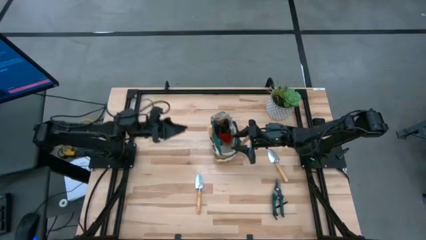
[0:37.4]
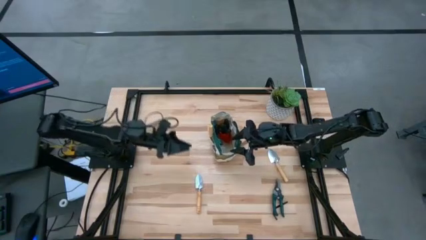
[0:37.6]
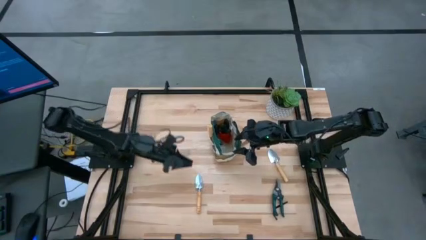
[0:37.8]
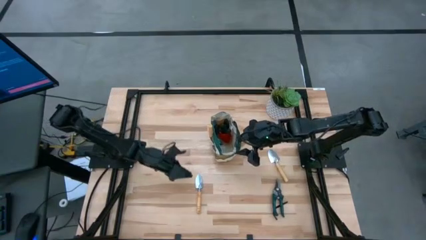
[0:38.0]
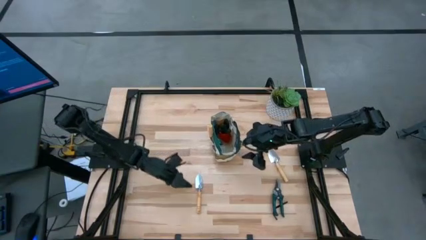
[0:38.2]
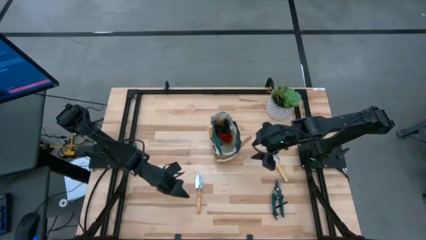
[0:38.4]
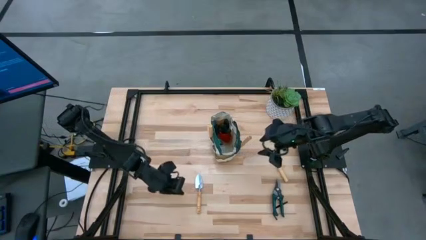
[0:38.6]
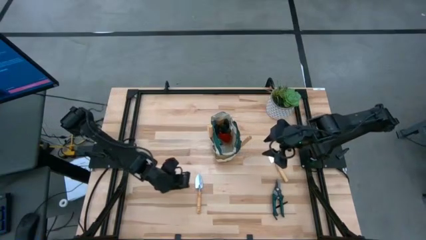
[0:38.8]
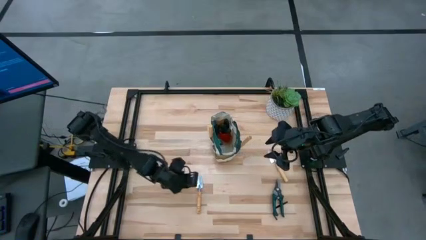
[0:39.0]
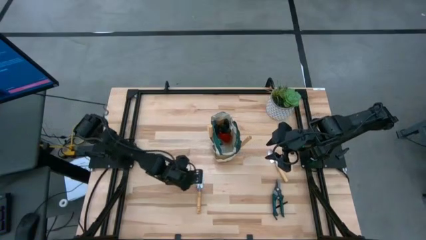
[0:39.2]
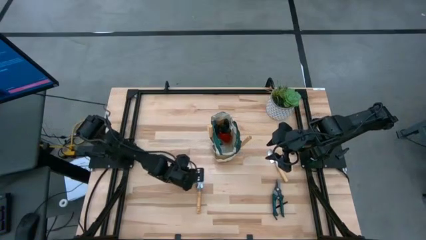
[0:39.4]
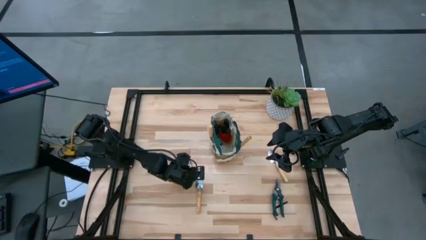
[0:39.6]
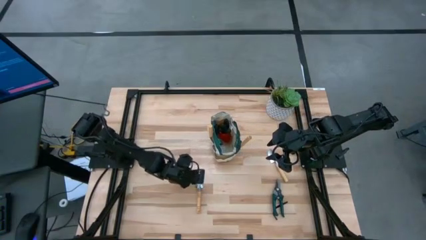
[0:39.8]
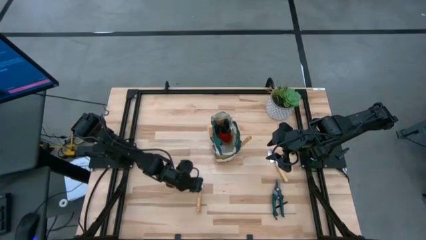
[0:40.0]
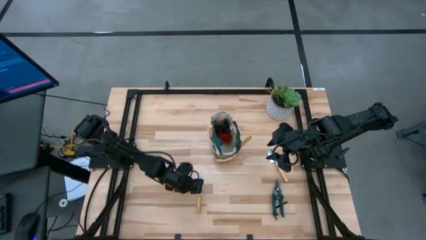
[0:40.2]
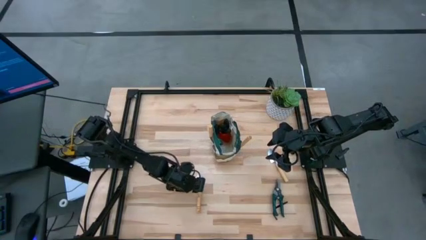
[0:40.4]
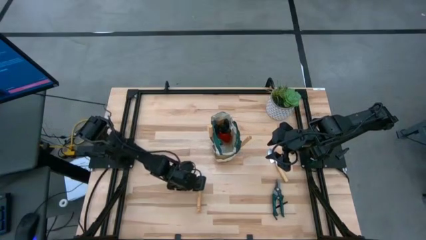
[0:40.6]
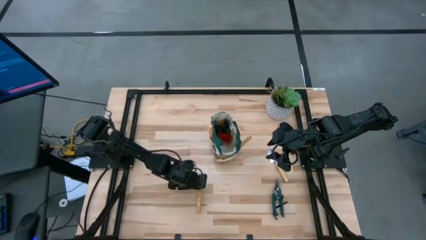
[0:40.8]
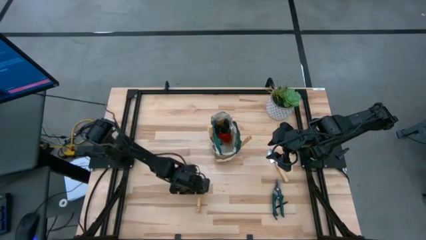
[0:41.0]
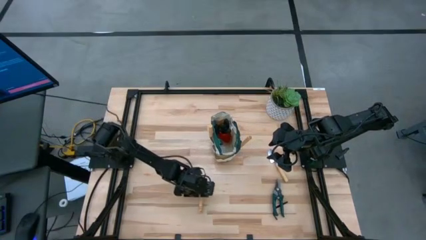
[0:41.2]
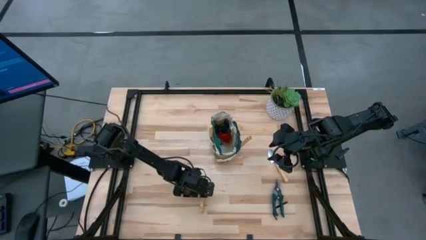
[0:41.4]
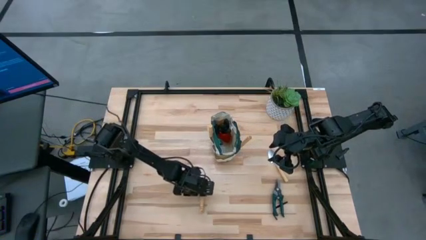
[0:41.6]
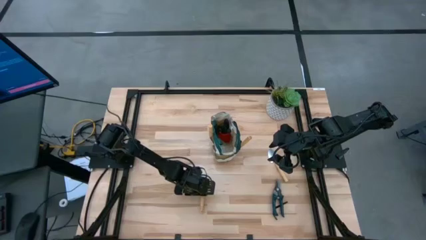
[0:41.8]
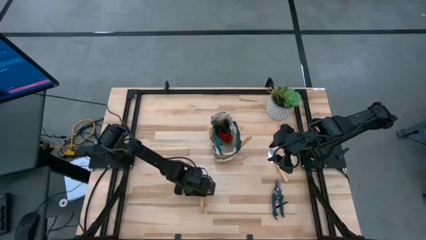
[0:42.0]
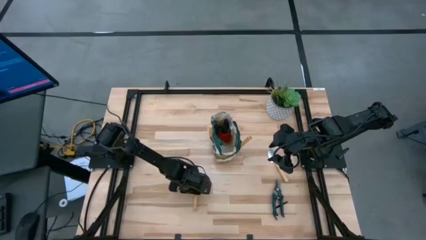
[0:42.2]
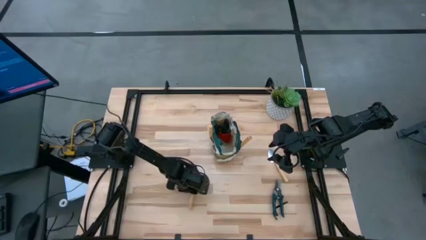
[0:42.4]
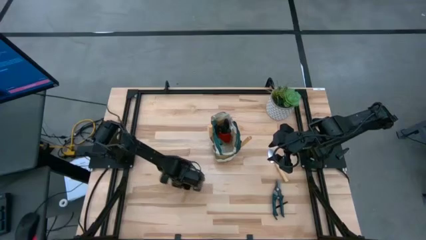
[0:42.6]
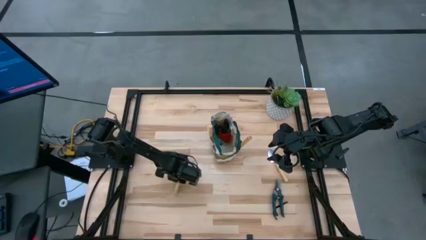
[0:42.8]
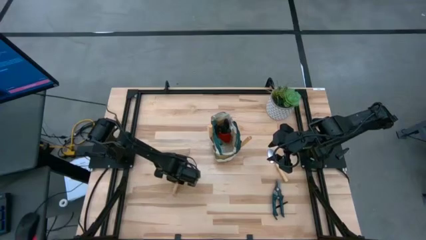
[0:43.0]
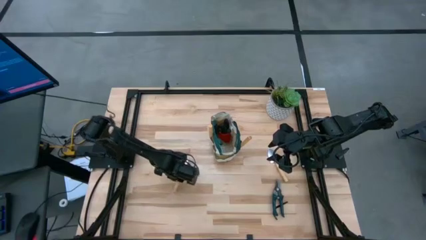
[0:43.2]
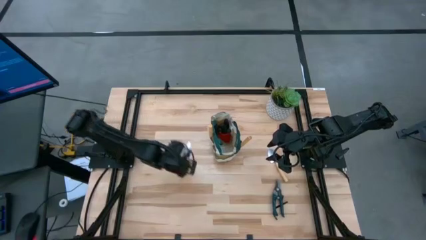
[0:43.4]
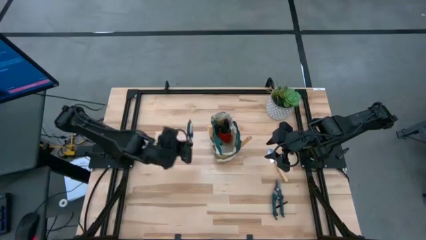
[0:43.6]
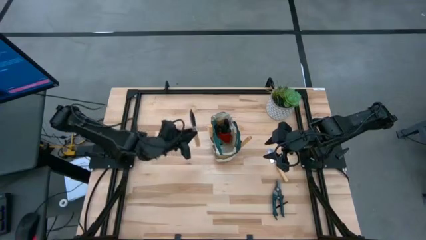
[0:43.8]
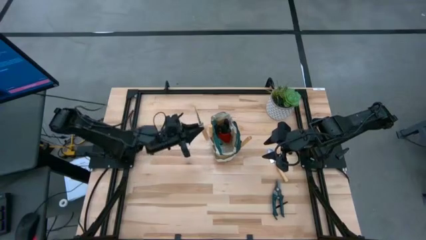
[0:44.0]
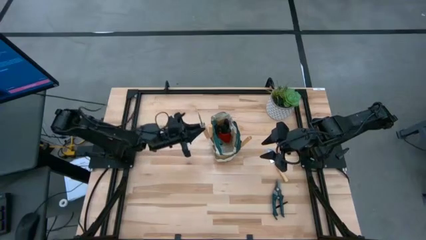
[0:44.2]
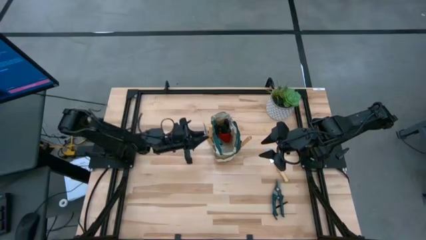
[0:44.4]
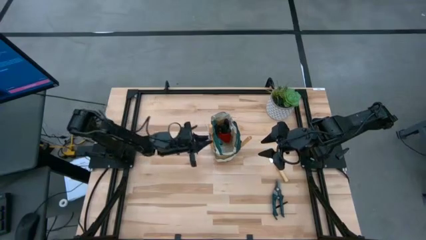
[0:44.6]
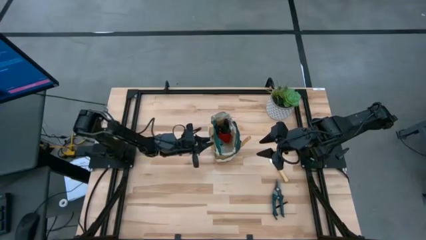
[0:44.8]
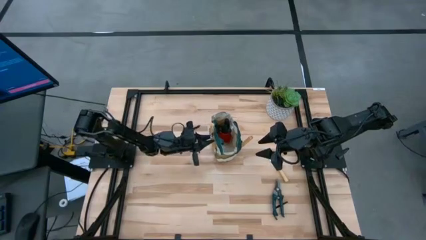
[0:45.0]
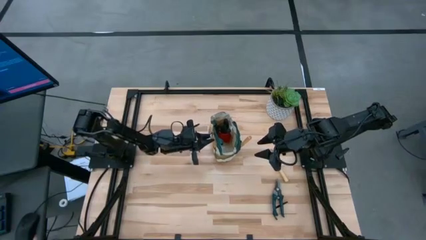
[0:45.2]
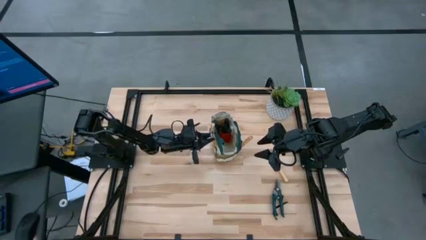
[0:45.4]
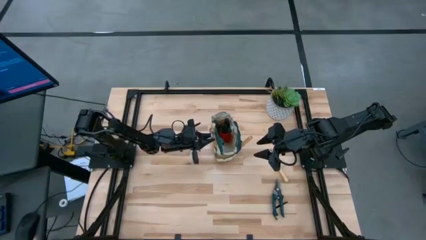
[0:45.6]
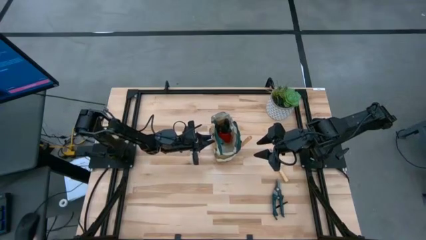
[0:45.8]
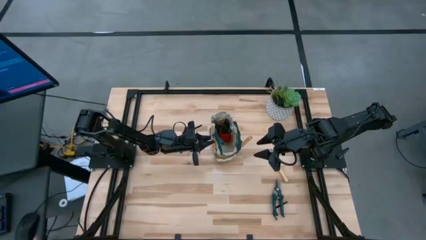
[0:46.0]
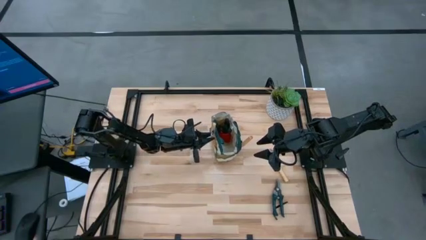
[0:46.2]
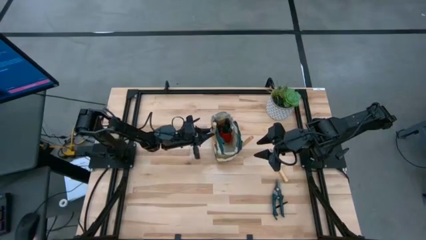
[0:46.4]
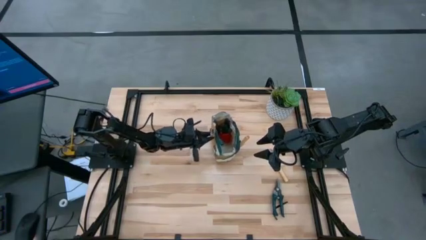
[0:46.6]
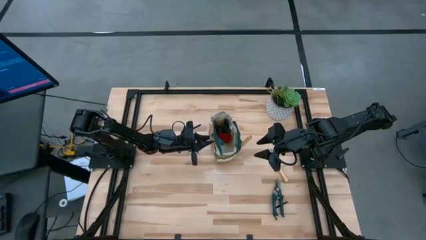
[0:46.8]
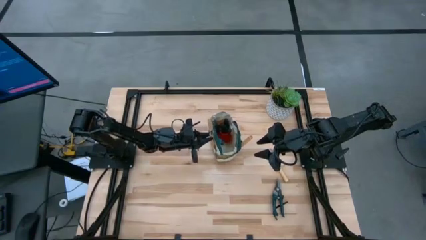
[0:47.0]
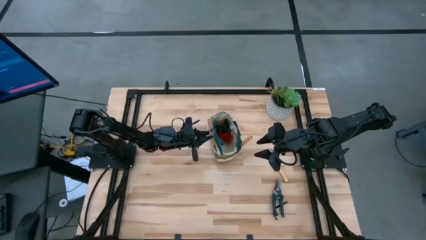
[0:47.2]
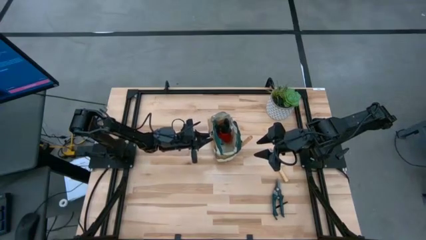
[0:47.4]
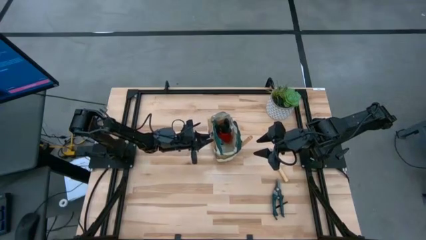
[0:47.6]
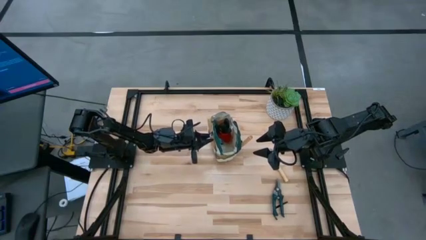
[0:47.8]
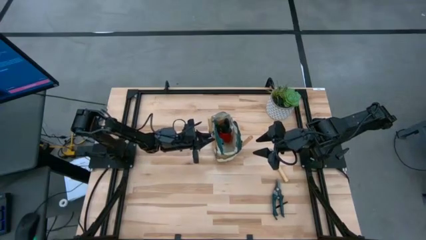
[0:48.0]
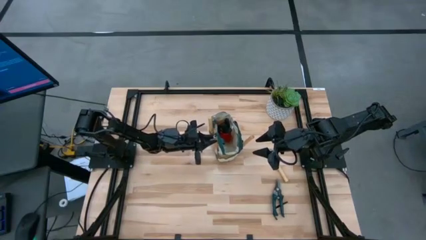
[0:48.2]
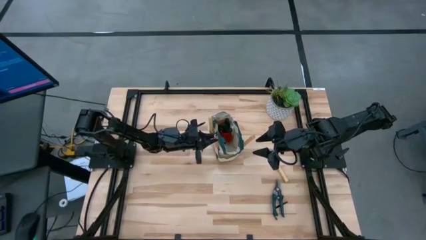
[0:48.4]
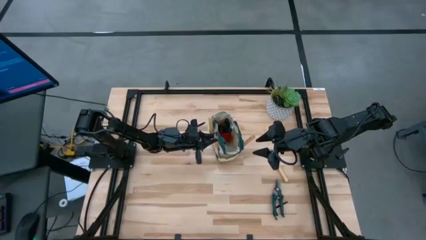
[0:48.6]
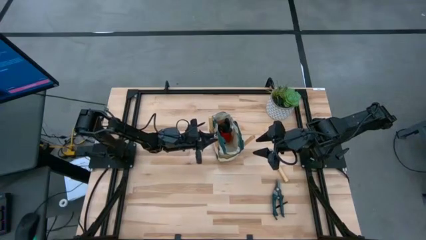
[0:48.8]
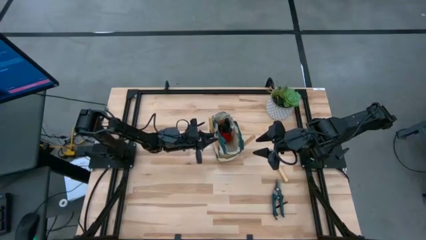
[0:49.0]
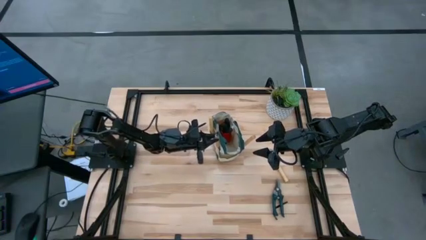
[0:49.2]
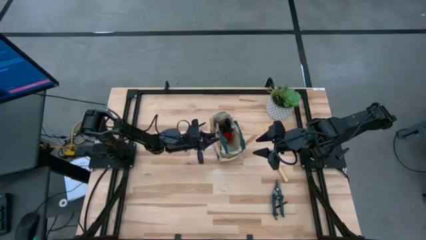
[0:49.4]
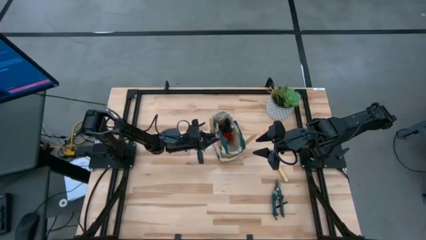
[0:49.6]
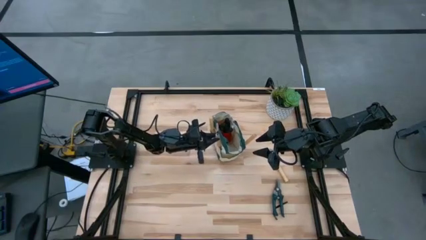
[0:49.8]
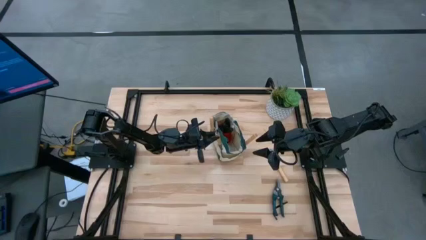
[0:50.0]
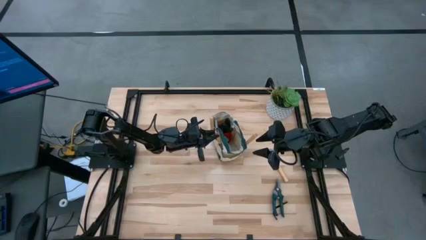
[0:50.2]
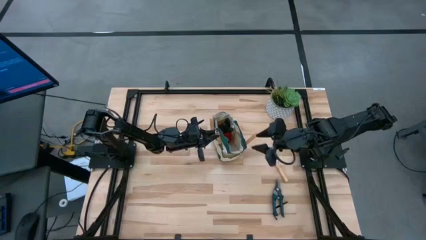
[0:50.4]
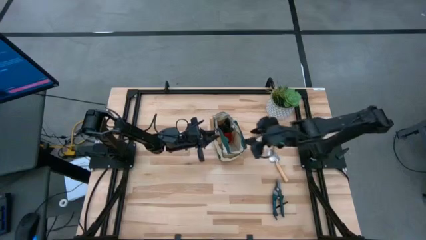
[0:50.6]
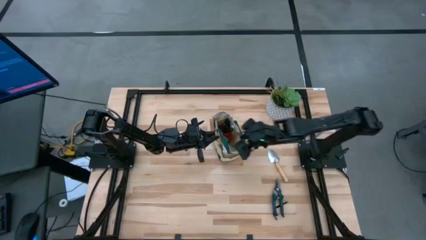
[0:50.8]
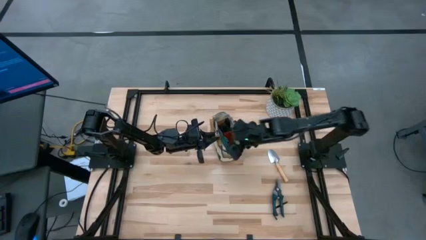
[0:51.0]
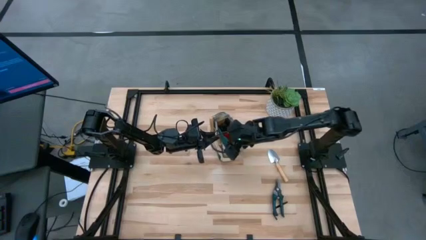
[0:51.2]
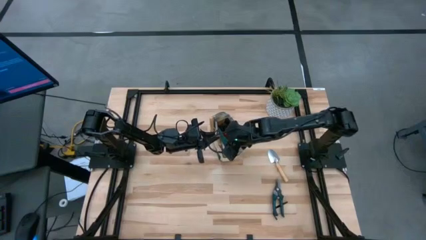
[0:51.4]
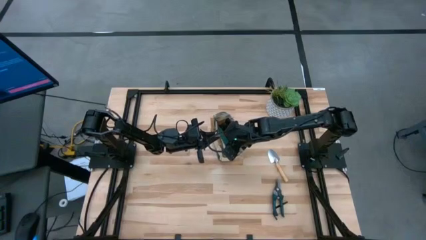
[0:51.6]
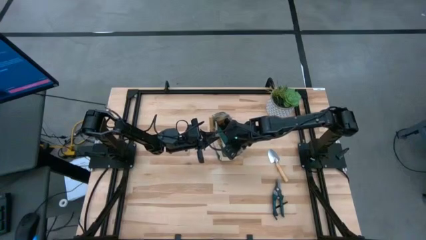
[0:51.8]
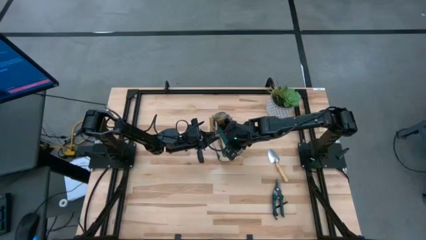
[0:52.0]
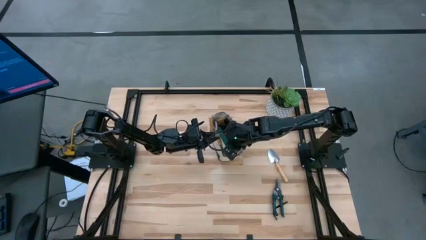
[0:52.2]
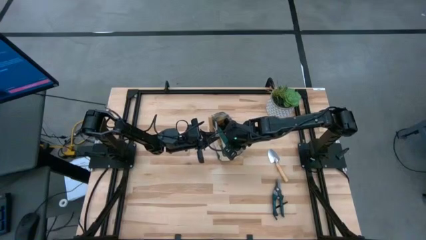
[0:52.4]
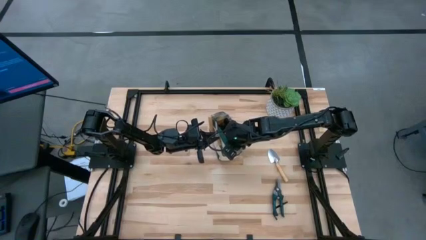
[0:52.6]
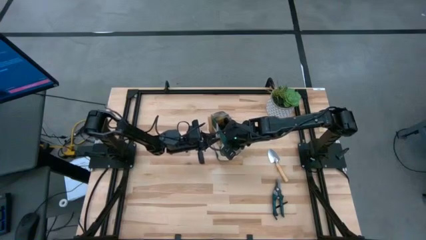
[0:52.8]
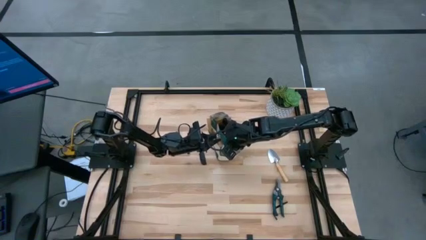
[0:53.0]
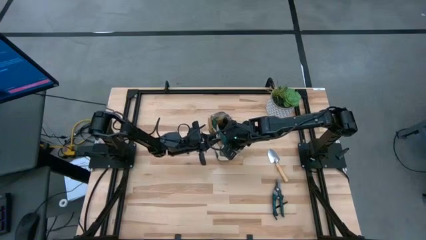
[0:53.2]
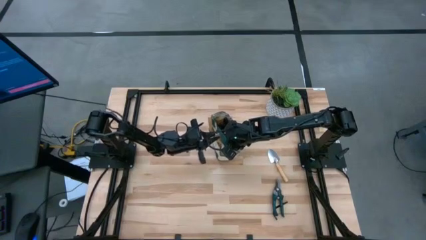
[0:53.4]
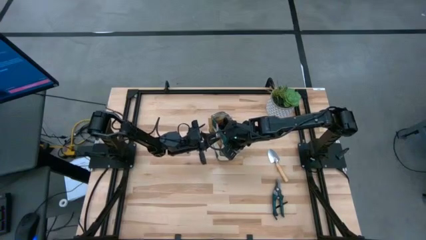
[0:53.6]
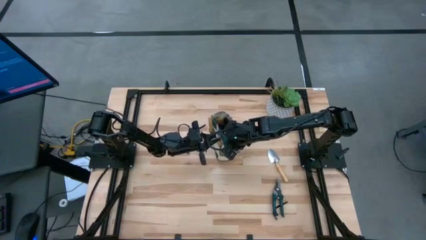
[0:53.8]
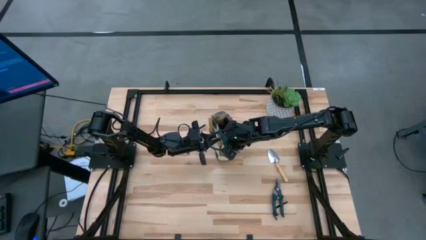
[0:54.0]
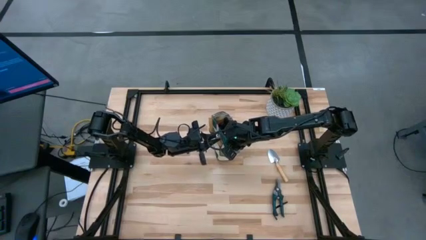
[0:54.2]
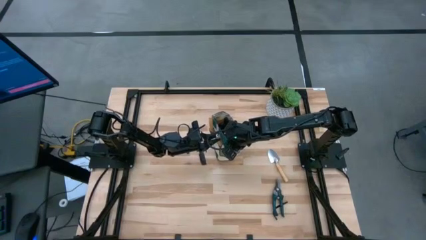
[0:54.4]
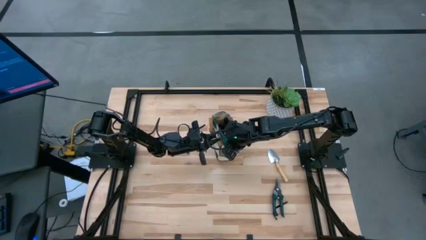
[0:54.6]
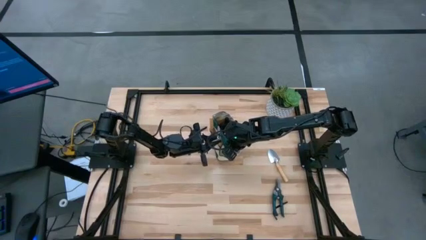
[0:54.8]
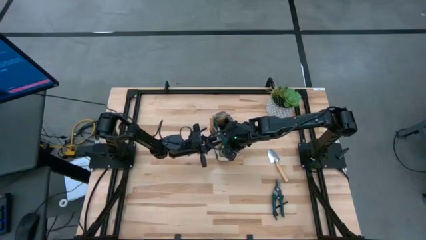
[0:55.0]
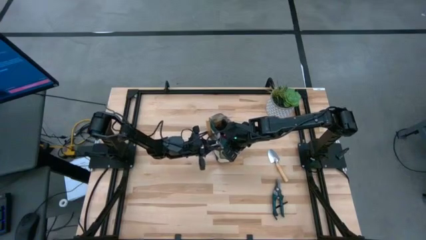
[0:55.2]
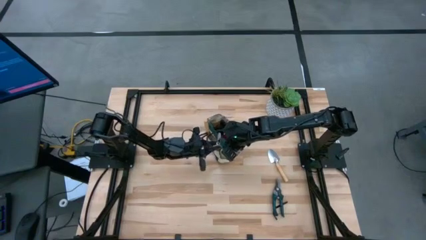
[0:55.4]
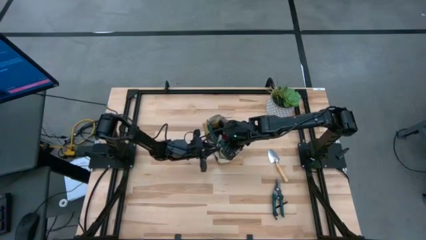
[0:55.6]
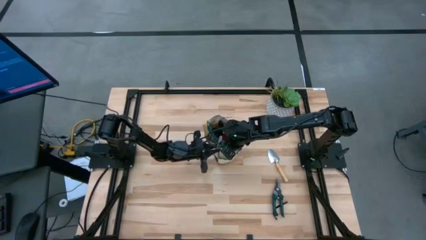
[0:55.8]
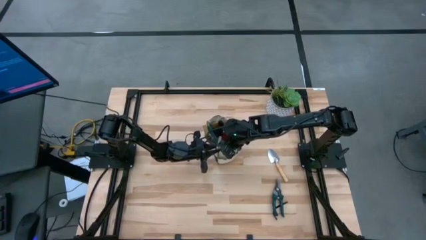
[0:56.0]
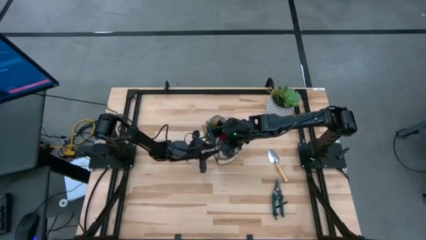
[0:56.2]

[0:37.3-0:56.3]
Task: Pick & Place Garden tools in Gardening bag
Put the brown trowel into the gardening bag
